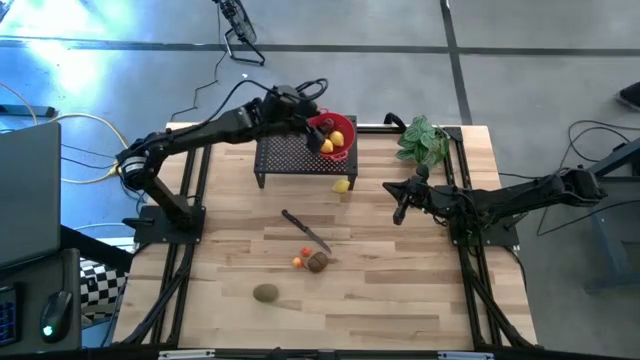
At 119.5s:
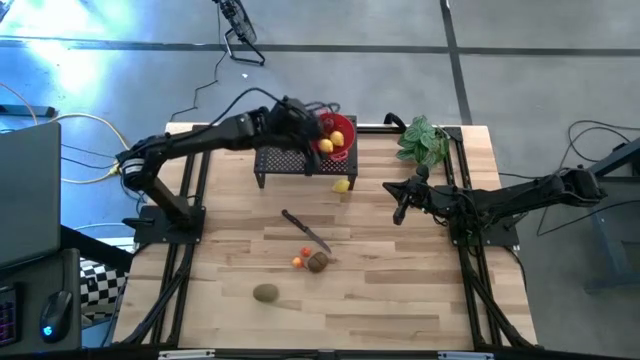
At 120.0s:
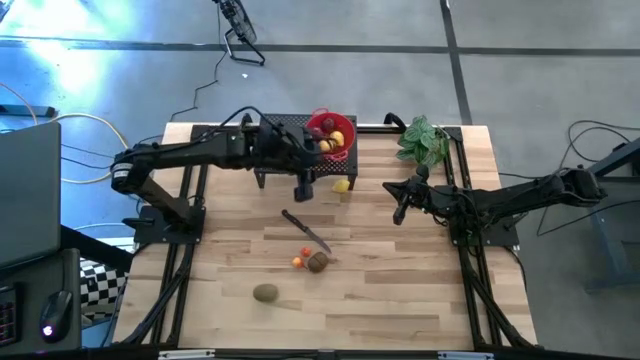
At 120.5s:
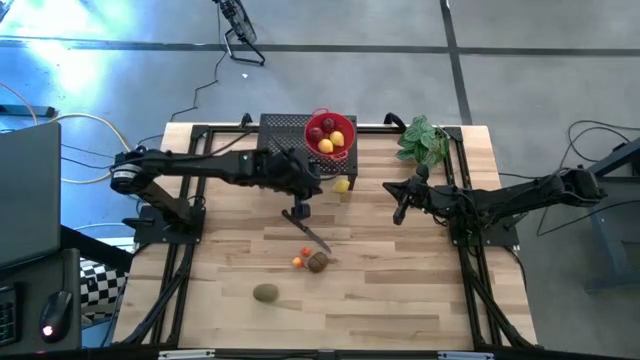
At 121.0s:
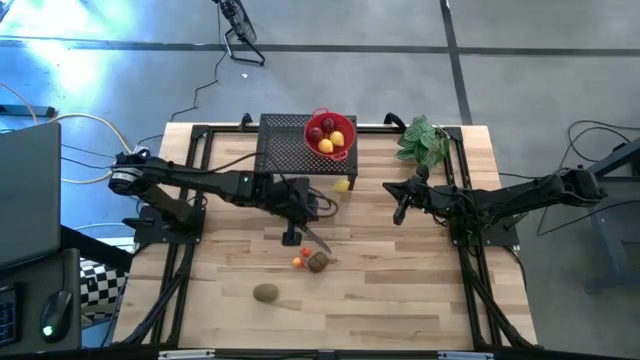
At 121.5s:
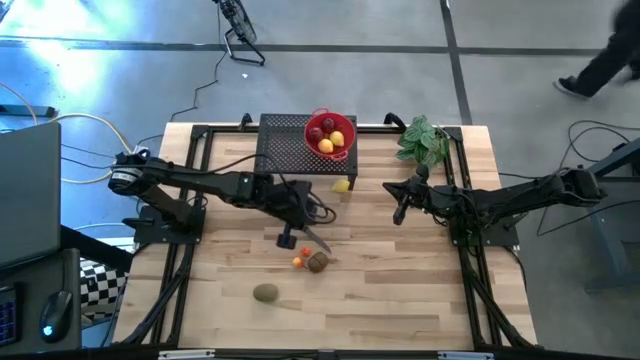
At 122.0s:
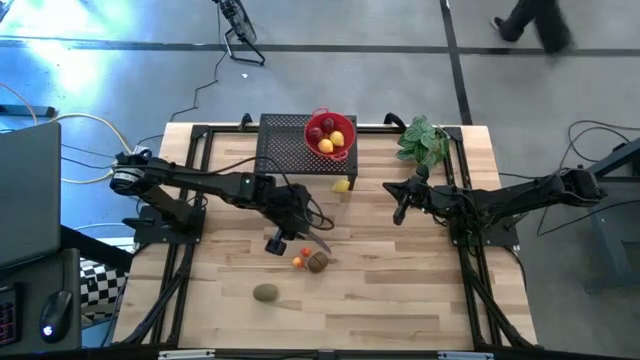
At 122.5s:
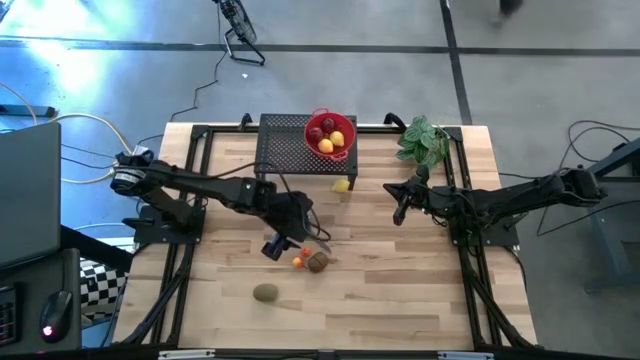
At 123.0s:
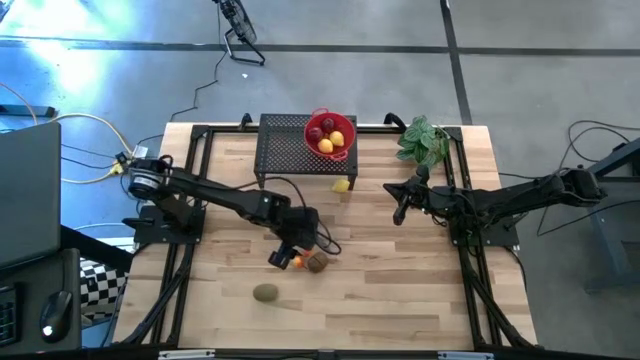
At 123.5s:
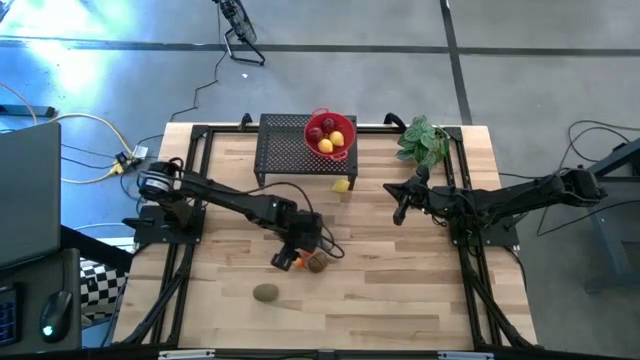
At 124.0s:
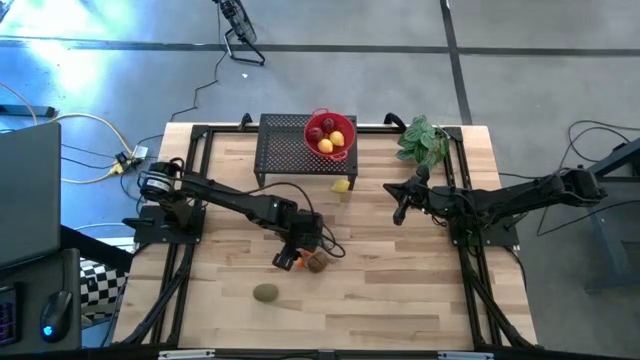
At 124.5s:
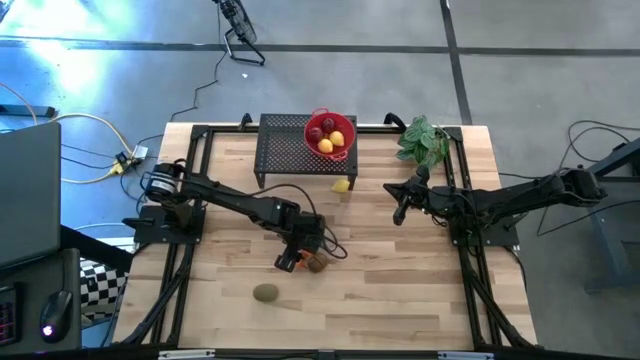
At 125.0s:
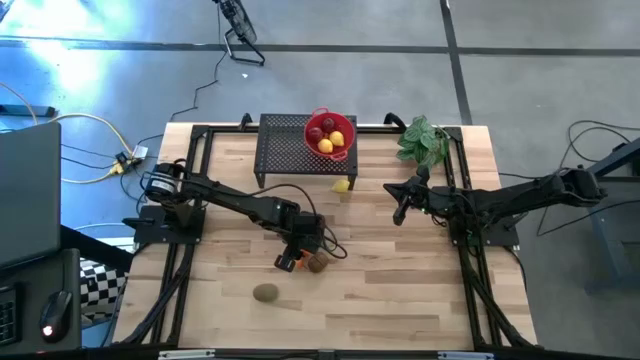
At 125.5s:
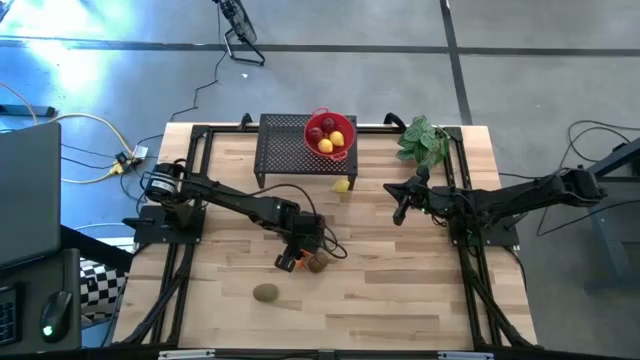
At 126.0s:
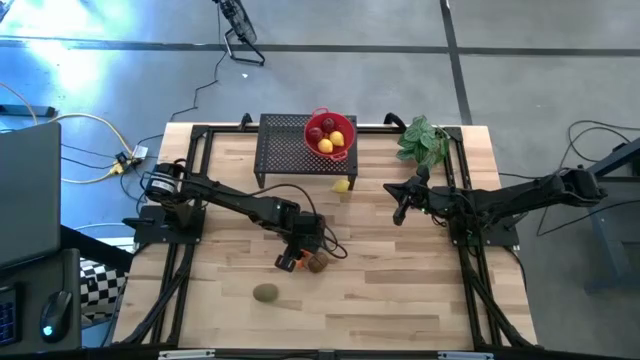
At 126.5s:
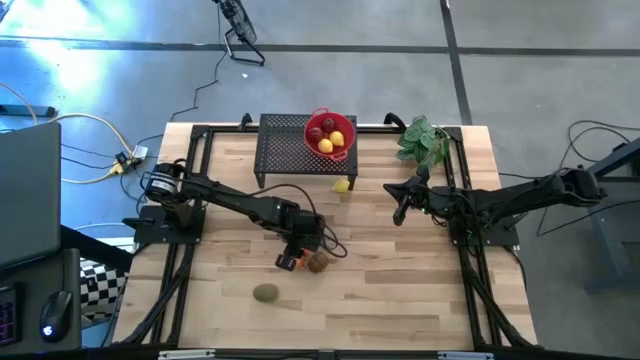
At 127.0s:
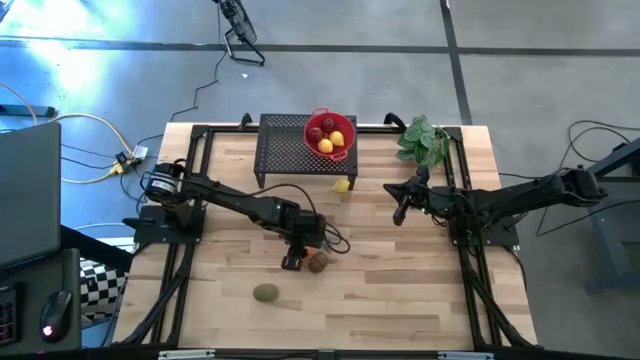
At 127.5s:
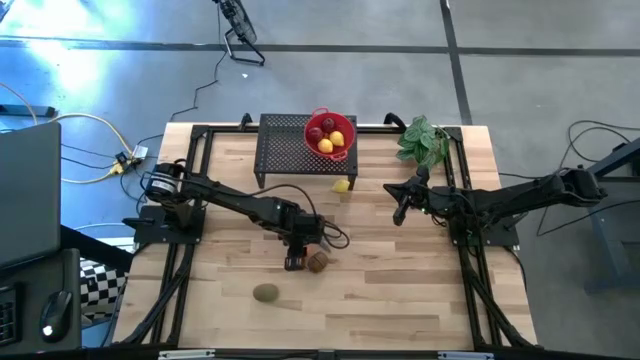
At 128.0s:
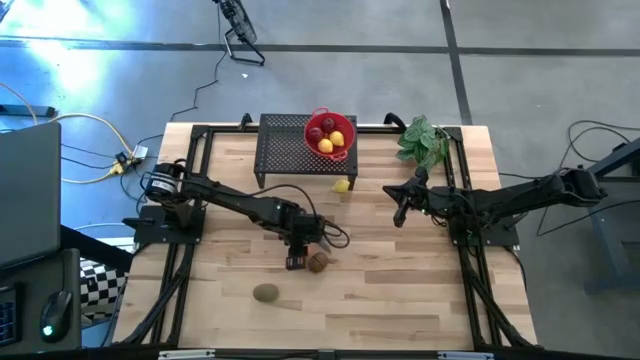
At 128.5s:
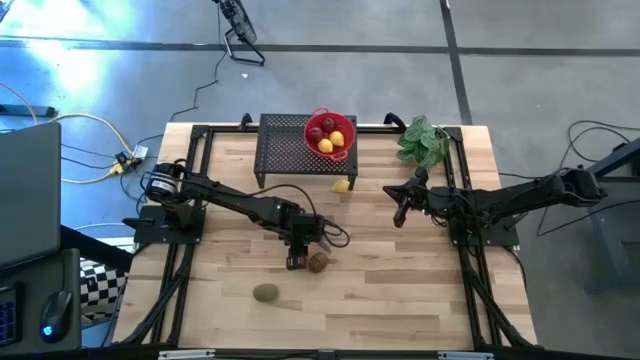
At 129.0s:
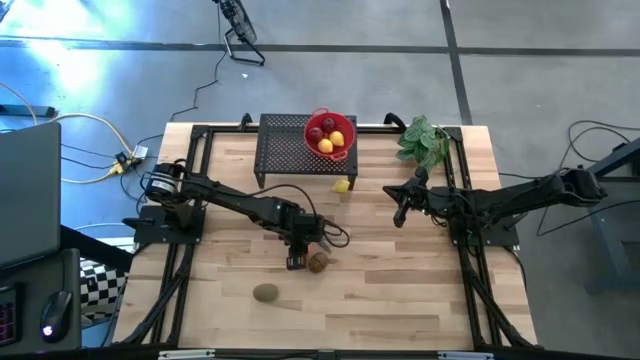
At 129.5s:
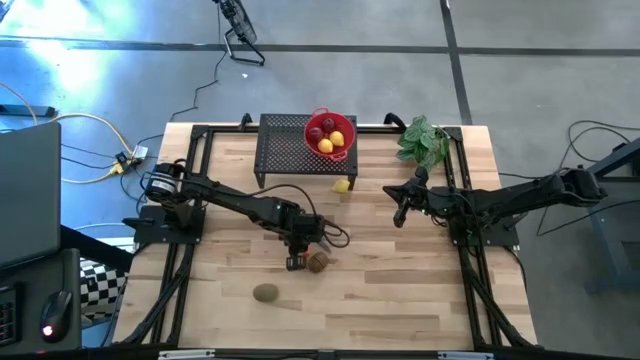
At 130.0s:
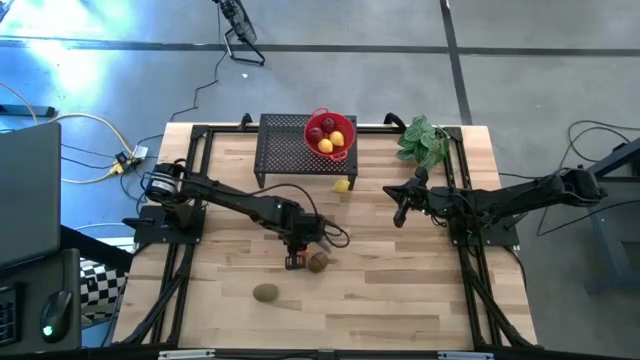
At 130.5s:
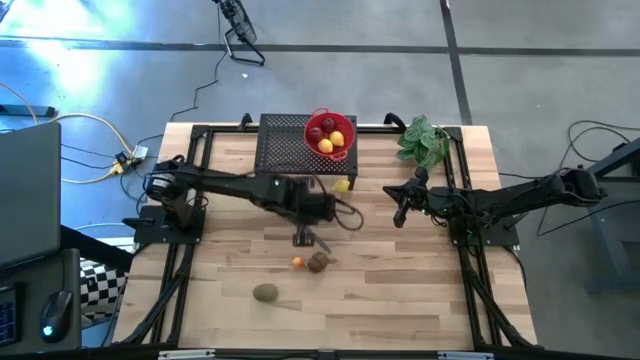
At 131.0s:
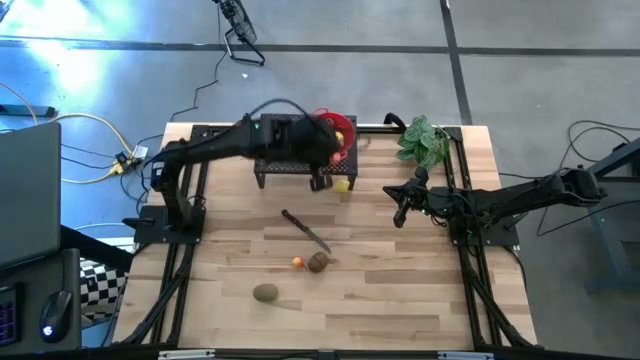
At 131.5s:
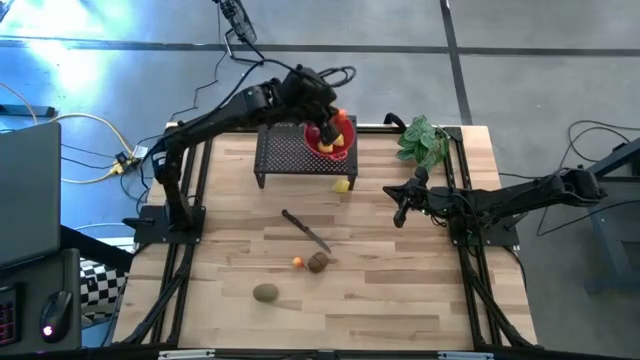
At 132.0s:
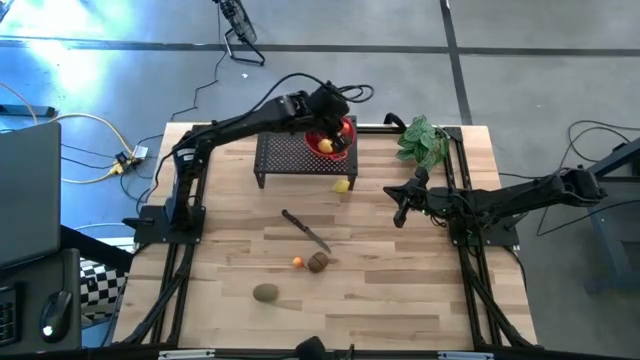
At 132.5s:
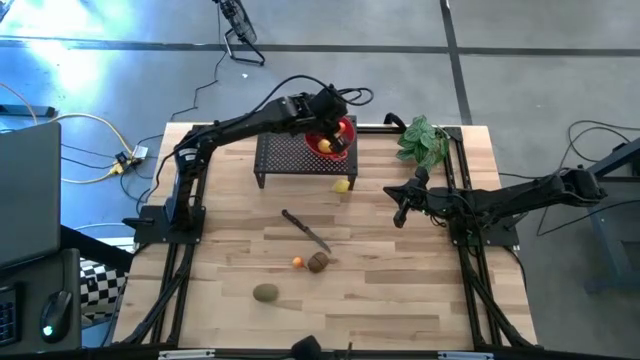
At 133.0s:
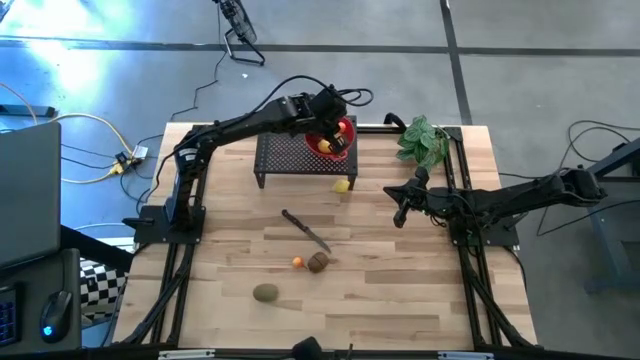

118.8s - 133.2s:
Task: Pick & Place Fruit
Put the top pear into the colander on the shelf

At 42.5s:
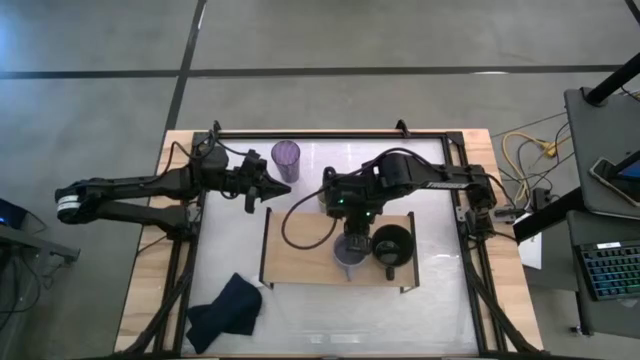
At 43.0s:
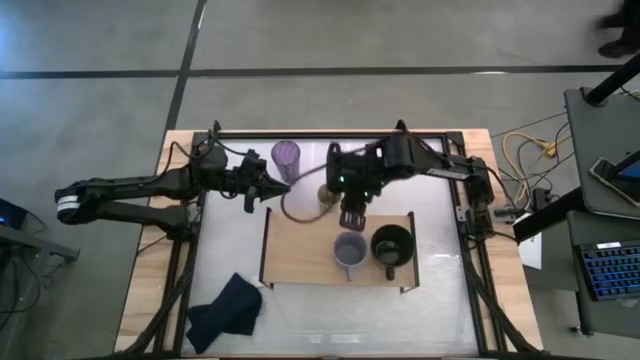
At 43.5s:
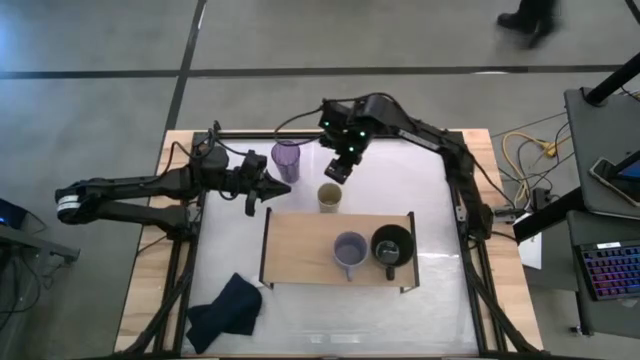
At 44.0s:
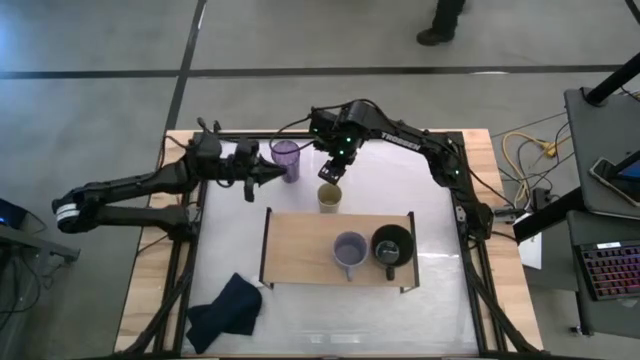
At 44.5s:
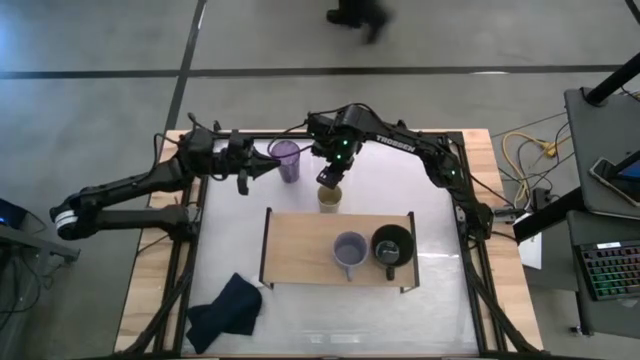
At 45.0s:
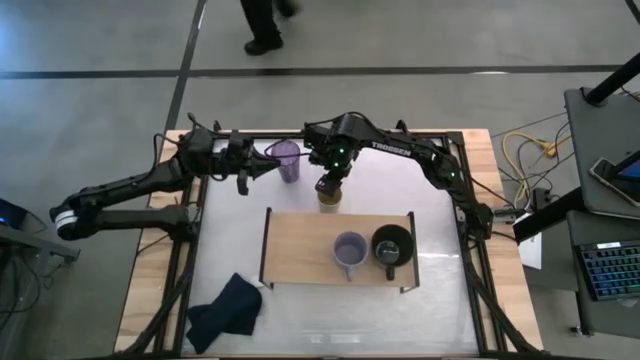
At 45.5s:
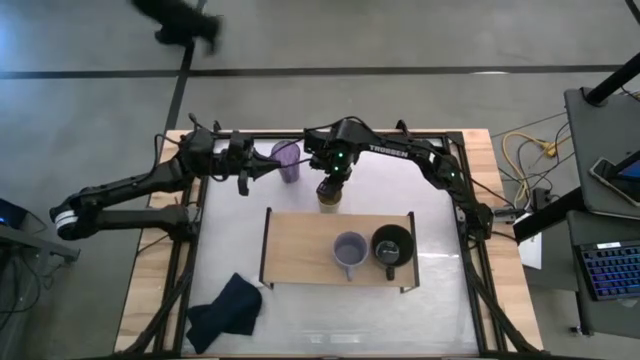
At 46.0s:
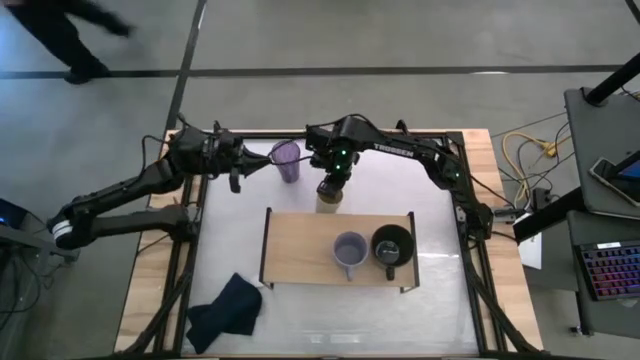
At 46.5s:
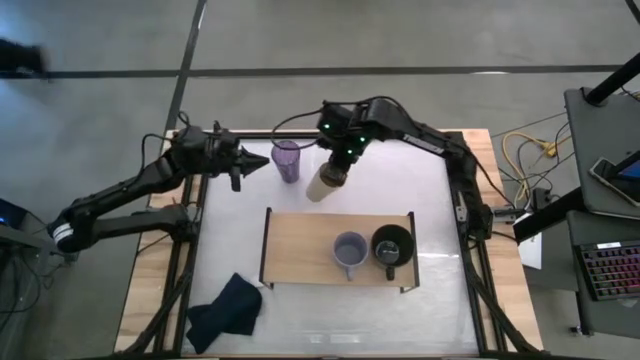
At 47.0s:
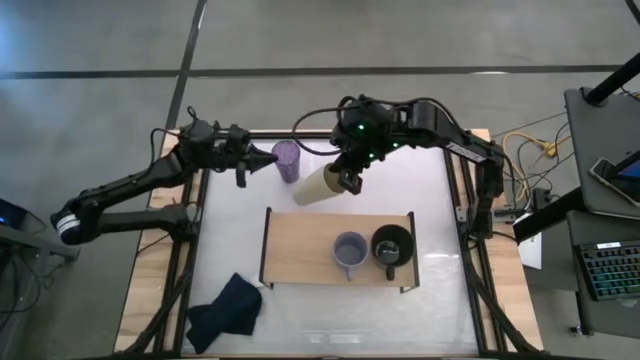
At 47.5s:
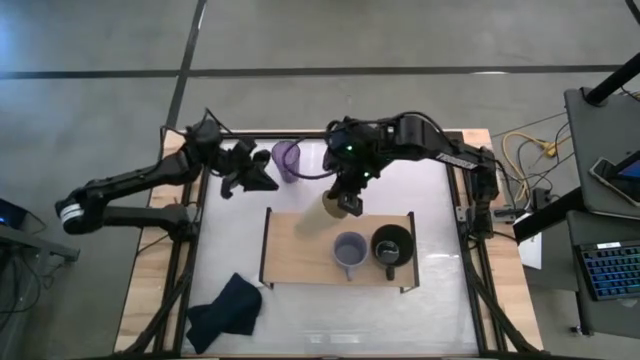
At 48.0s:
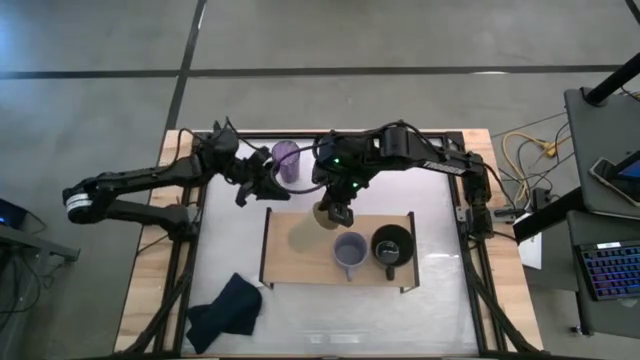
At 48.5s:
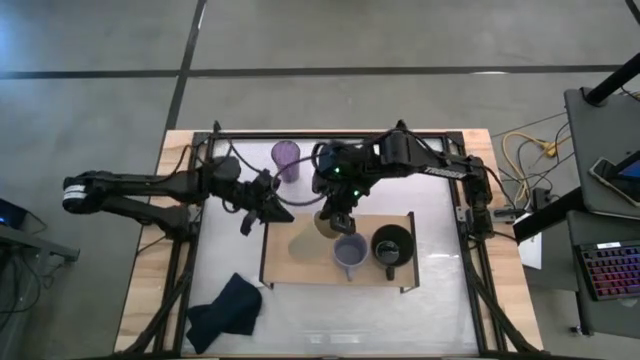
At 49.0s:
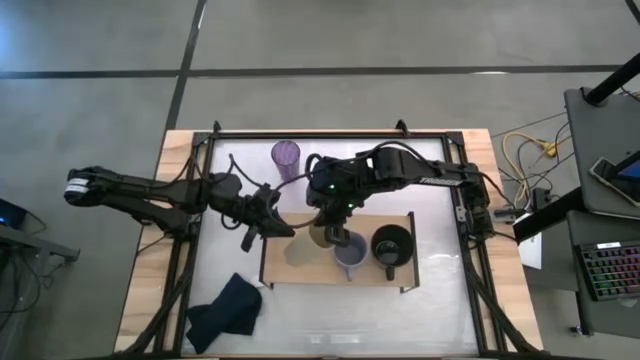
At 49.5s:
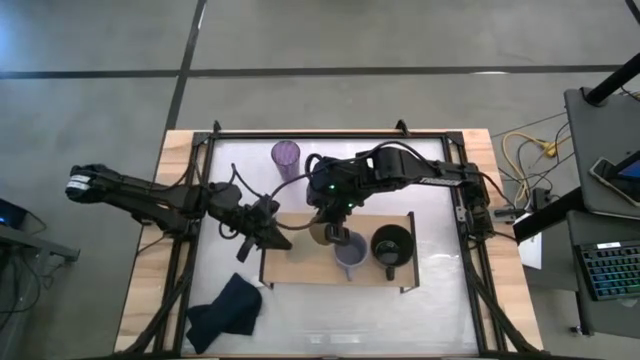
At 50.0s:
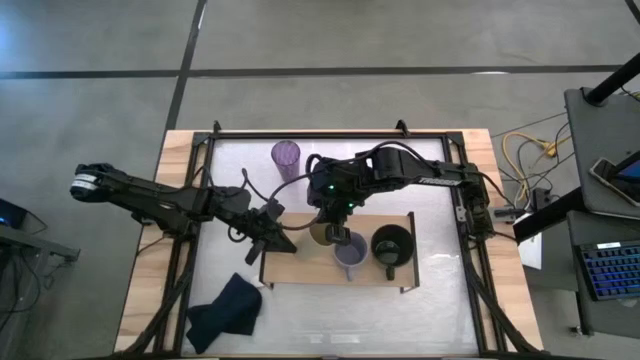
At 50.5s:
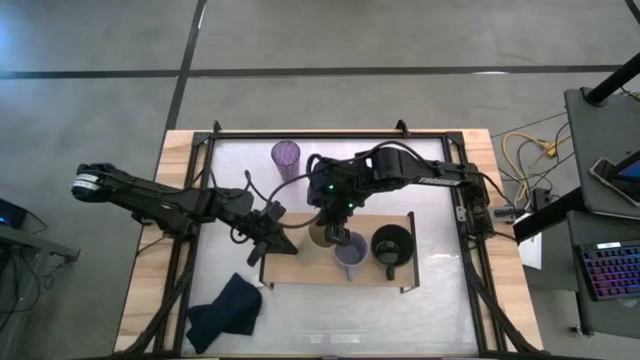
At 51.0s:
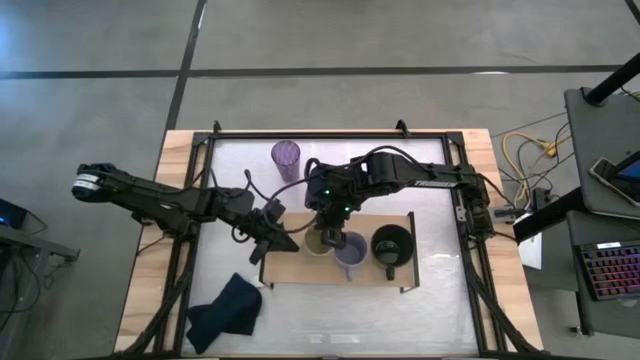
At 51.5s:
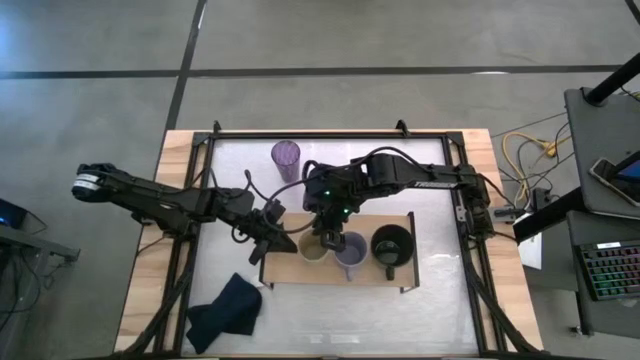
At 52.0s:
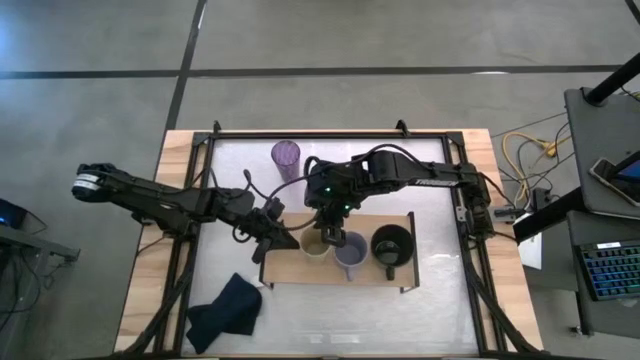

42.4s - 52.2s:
Task: Stack small to large cups/mugs on shelf
Put the yellow cup on the shelf
